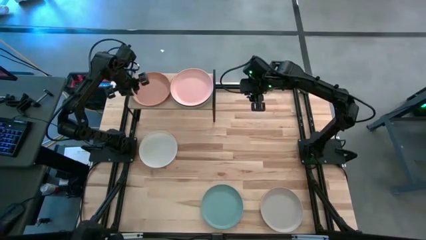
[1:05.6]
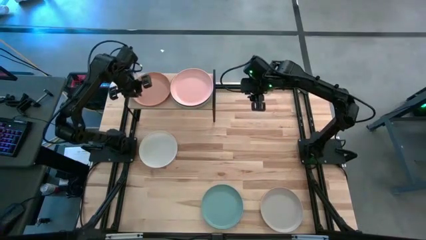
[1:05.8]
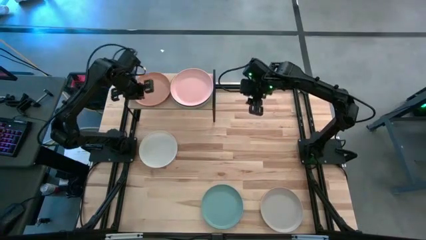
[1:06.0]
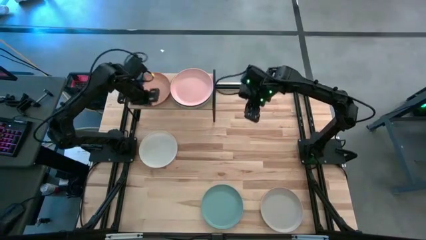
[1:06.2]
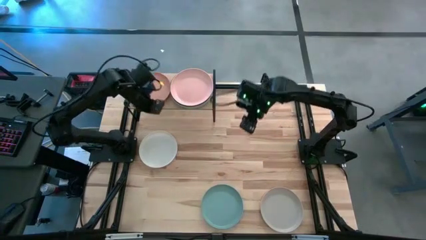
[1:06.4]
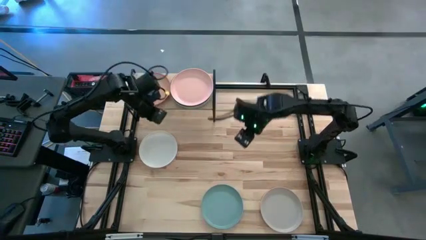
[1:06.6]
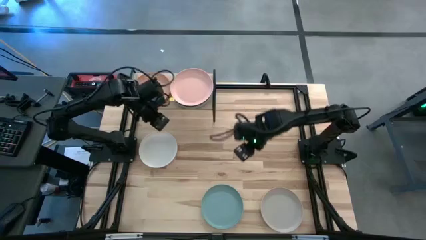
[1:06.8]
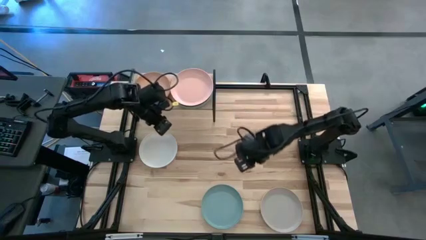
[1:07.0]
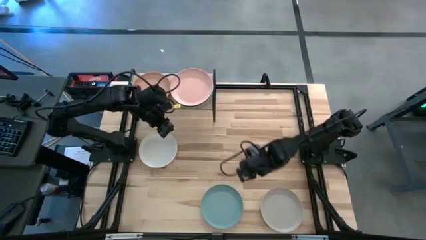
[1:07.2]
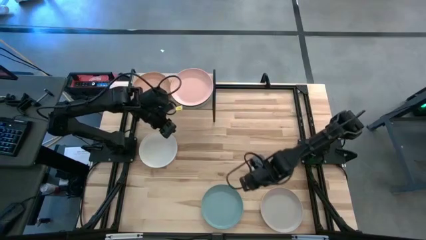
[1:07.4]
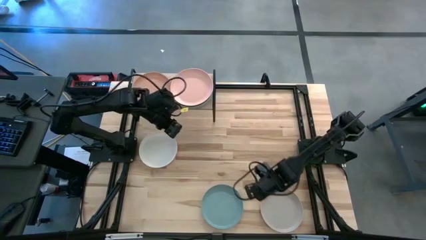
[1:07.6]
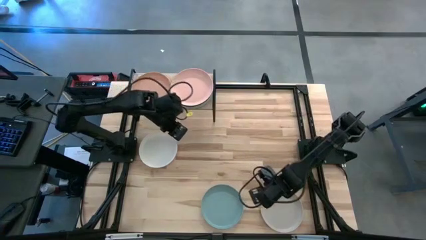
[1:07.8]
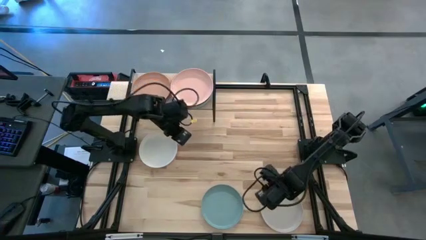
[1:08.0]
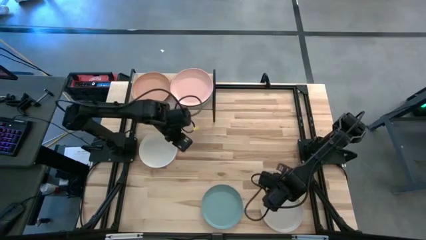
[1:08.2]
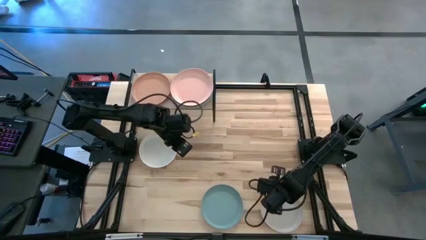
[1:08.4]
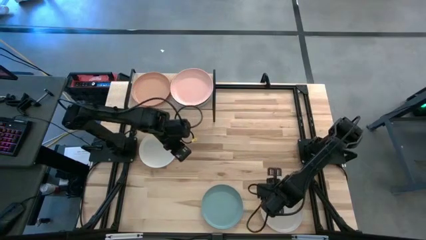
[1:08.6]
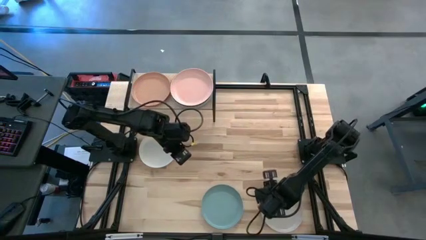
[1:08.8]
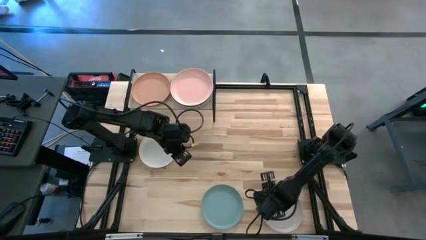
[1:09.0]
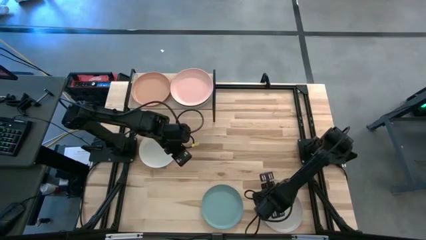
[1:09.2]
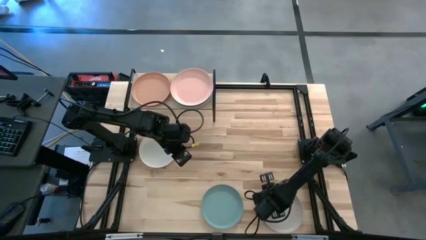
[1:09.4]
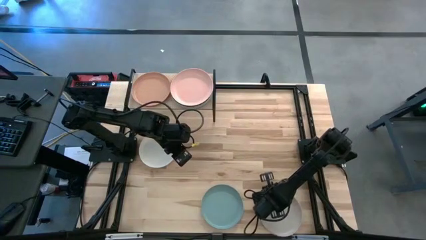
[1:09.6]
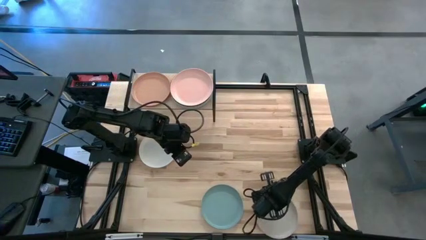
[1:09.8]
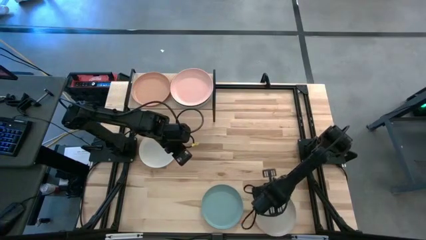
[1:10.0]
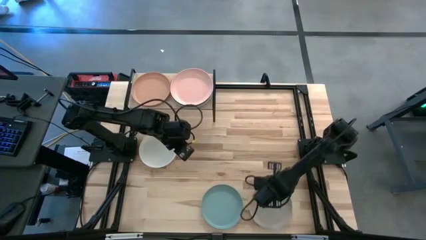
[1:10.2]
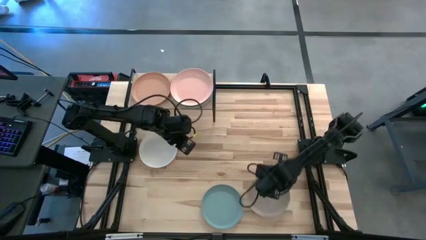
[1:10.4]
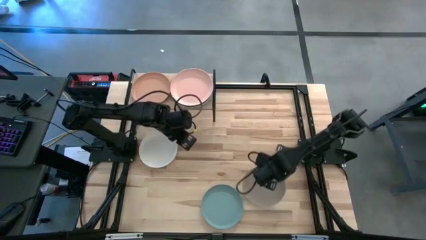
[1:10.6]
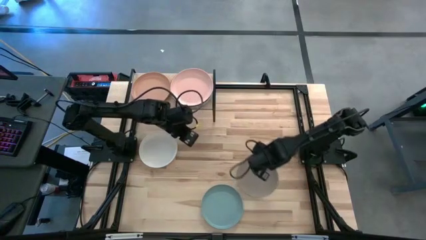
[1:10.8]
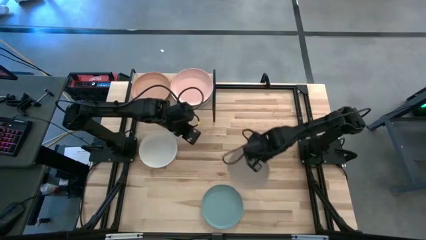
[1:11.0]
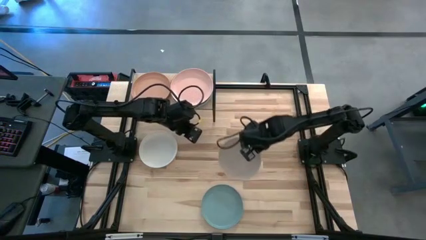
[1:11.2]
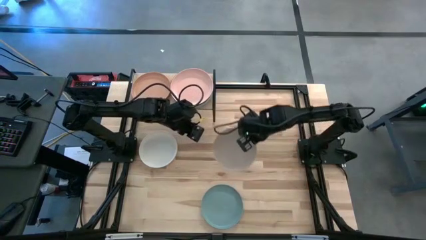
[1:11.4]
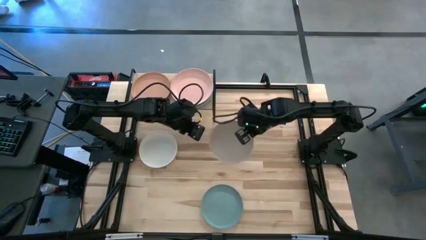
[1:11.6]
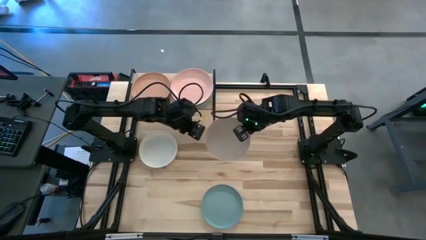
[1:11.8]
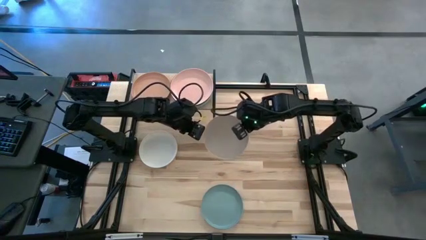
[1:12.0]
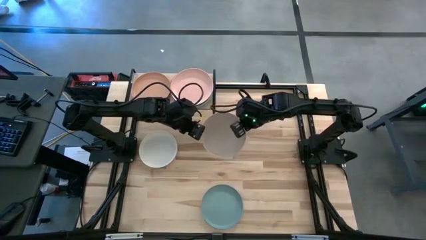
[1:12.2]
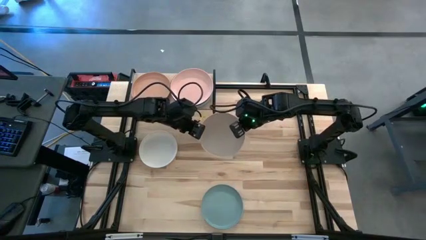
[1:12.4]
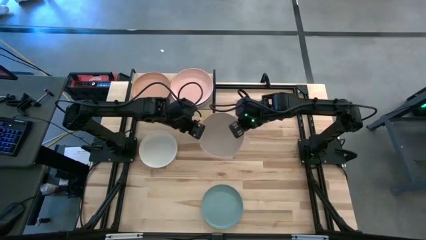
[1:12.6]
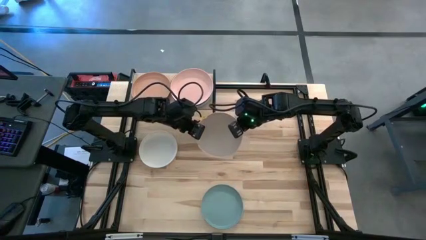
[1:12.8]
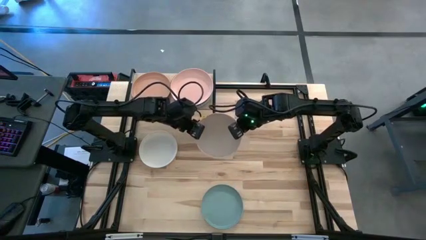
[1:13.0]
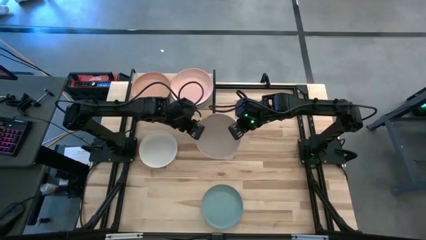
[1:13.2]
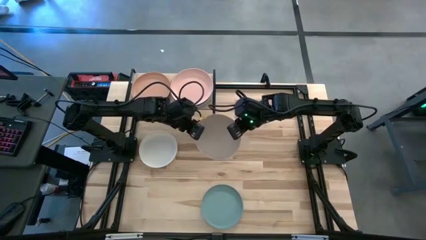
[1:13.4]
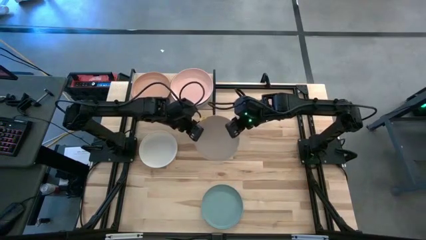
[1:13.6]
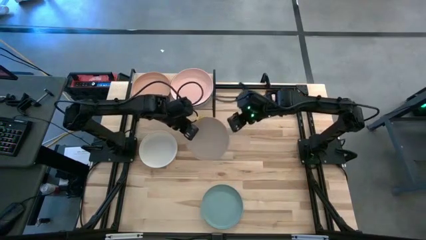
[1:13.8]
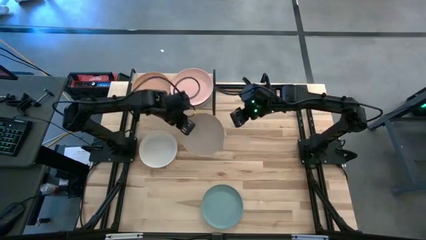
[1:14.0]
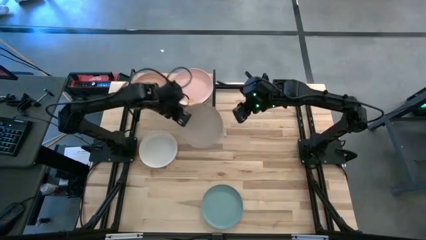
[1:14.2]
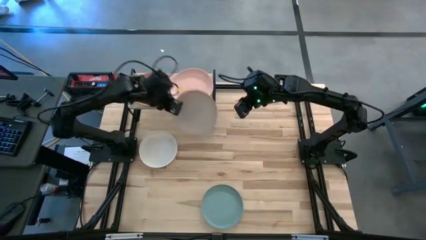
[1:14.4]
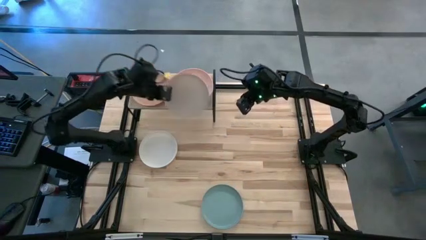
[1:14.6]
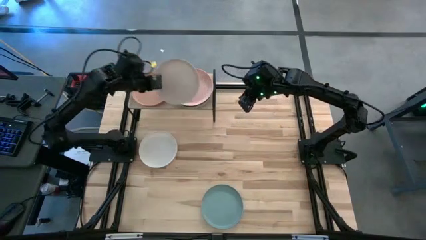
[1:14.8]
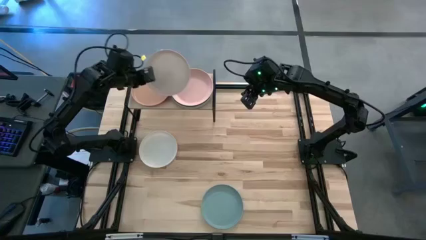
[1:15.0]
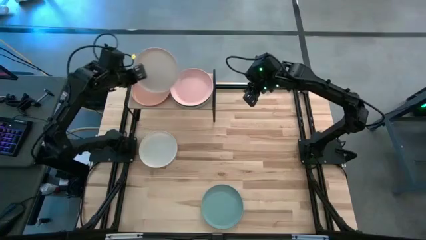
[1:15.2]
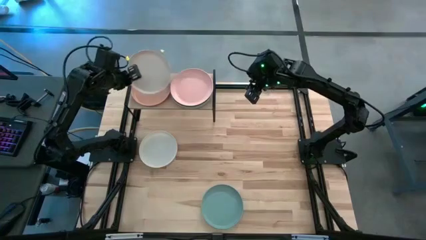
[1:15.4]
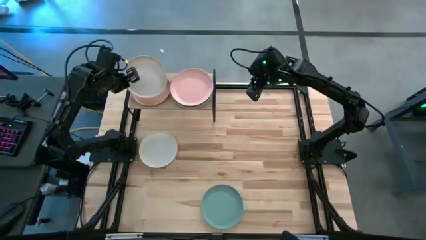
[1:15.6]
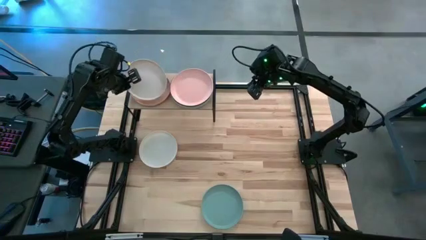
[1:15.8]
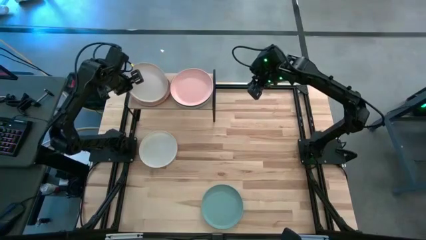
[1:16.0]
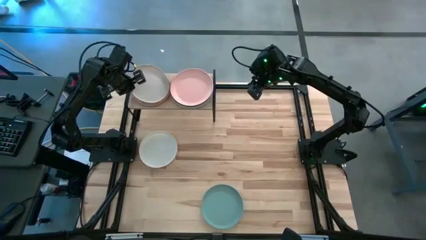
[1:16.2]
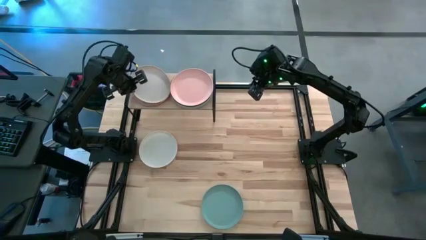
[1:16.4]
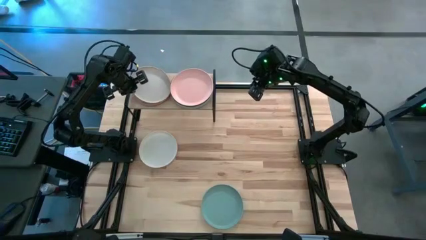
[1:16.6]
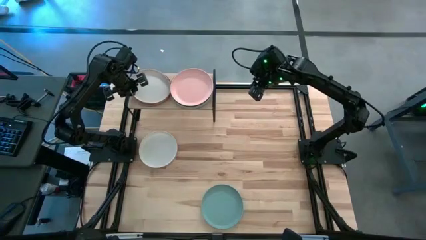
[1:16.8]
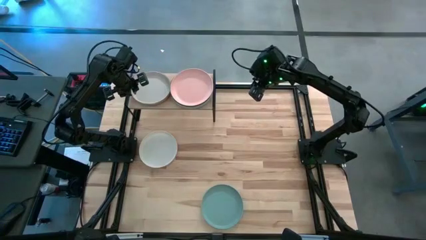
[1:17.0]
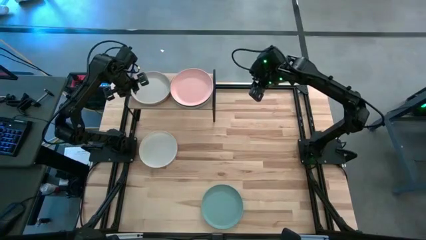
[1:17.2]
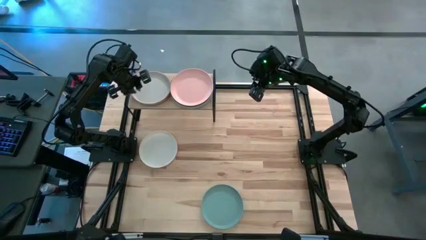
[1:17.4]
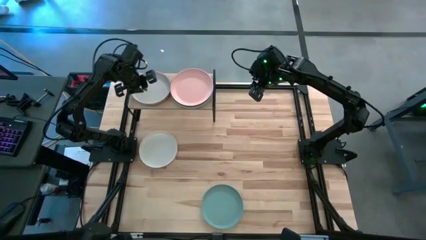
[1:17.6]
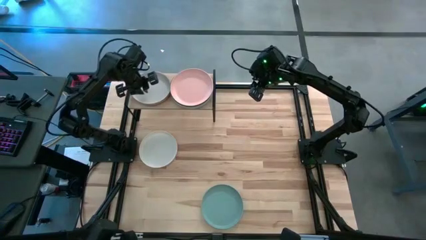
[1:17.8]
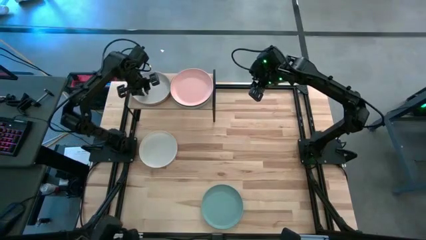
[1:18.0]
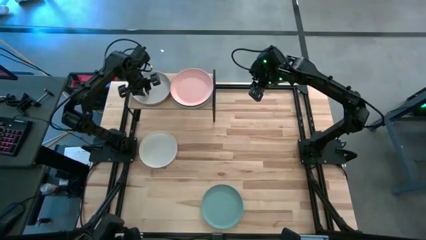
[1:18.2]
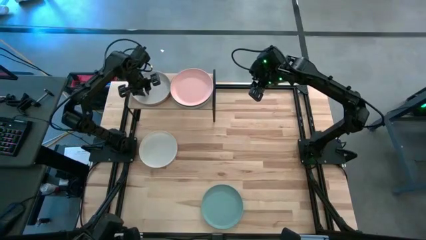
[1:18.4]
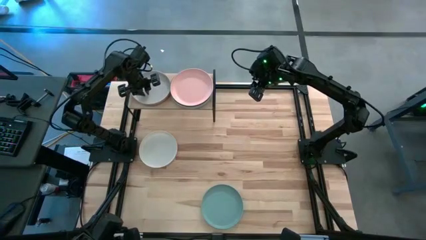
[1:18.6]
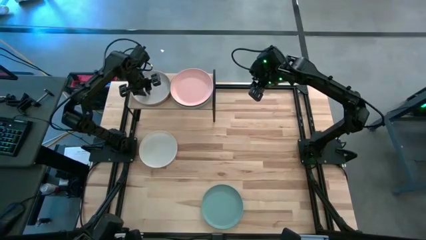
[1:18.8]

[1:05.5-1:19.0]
Task: Place and stack plates onto a shelf
Stack the gray plate on top of the orange plate on the shelf

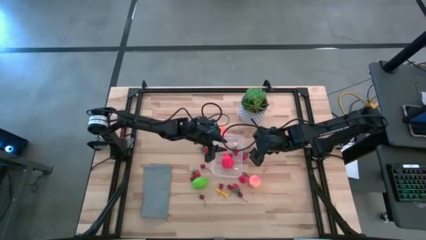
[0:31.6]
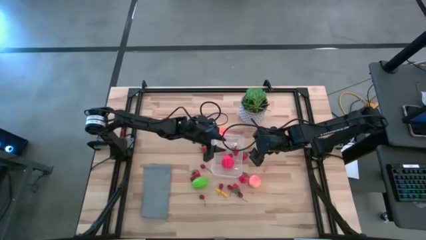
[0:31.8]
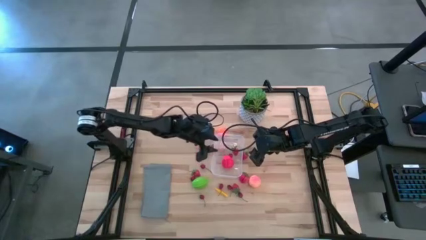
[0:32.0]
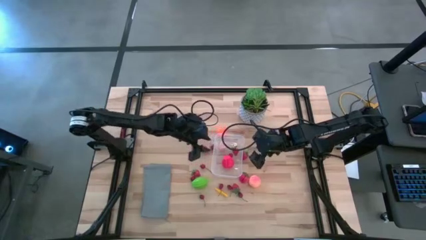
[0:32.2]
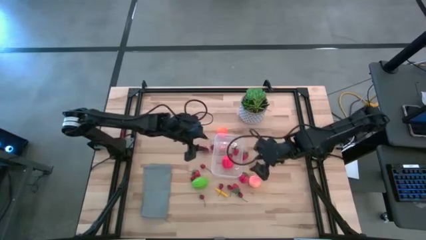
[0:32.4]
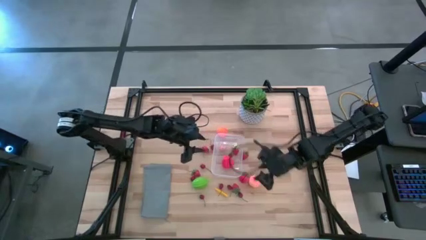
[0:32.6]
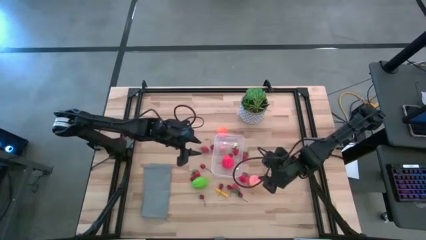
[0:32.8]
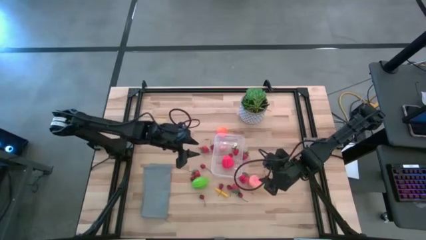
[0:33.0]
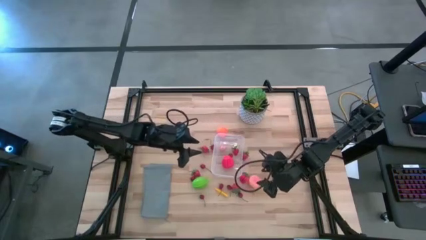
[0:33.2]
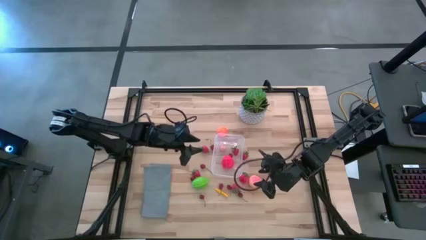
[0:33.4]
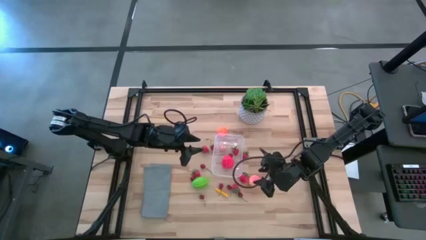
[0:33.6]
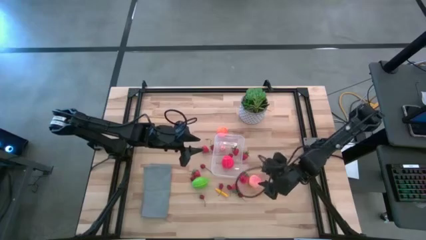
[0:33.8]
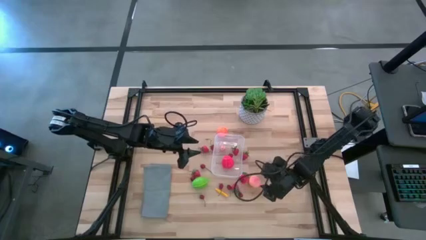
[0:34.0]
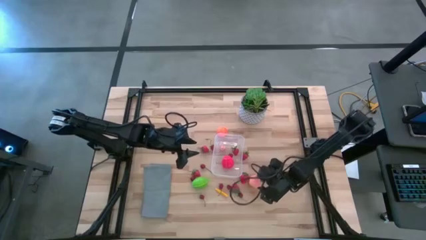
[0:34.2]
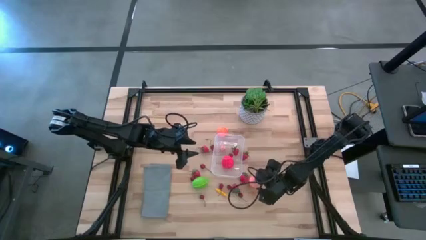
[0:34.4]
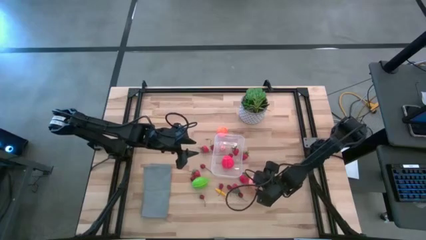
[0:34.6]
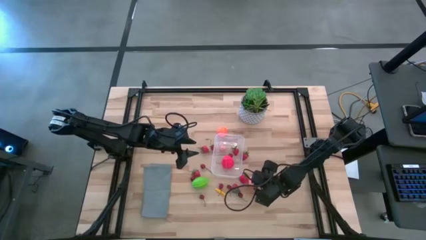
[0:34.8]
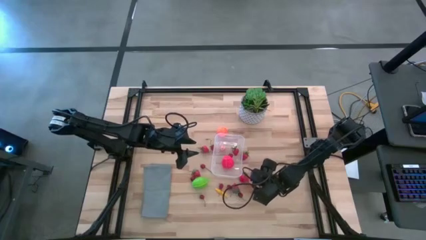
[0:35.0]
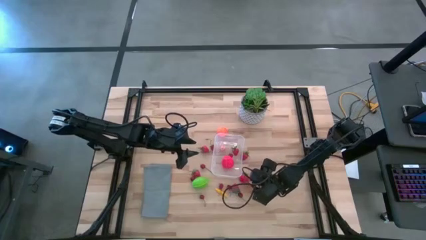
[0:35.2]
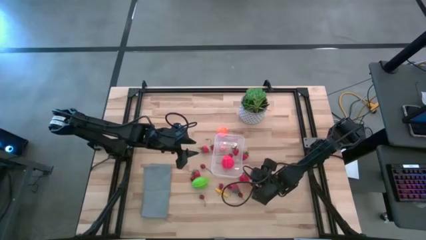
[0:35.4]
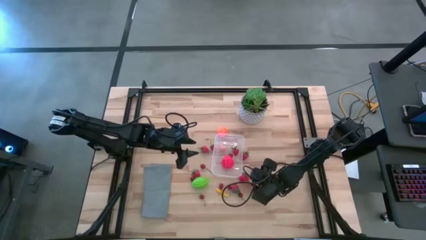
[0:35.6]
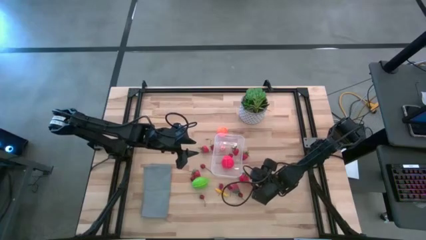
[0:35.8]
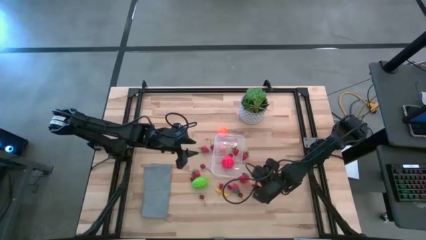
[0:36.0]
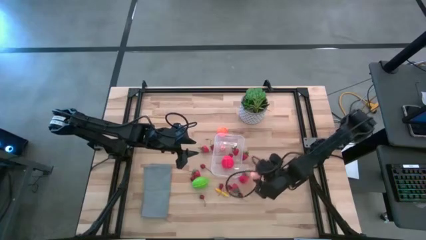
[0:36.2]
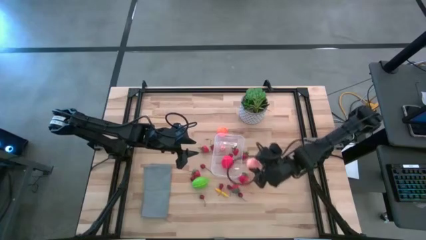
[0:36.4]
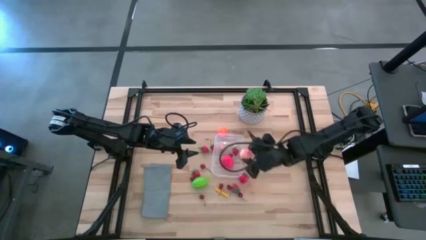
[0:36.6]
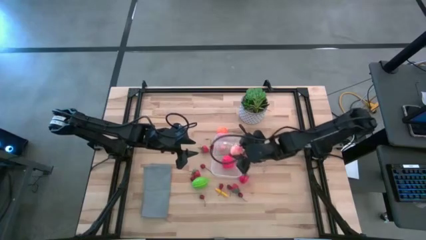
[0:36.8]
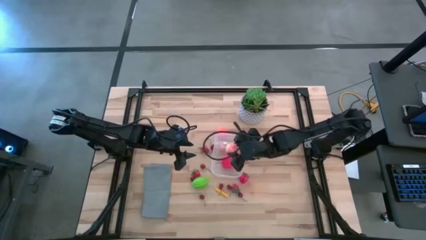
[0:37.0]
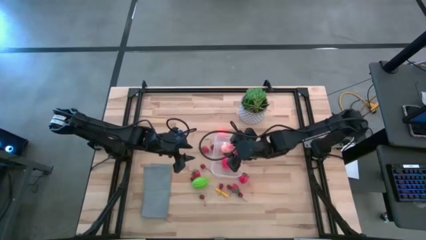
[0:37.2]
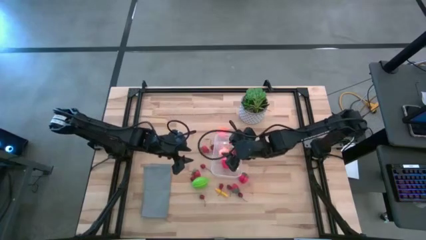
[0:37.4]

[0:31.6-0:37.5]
Task: Pick and placing Produce into tupperware
Put the pink peach into the transparent bin
